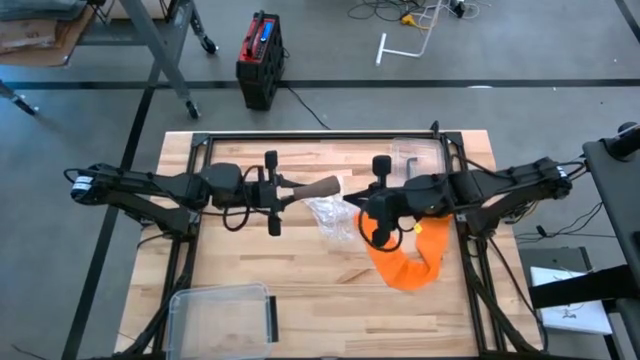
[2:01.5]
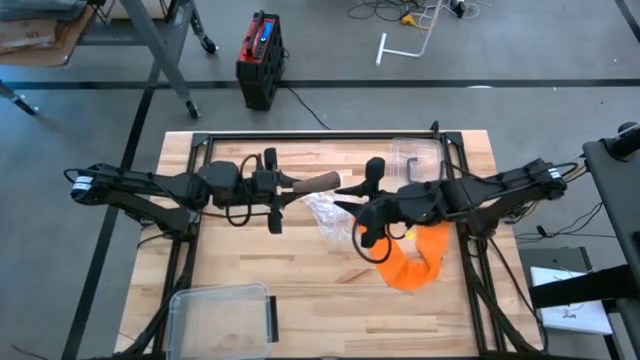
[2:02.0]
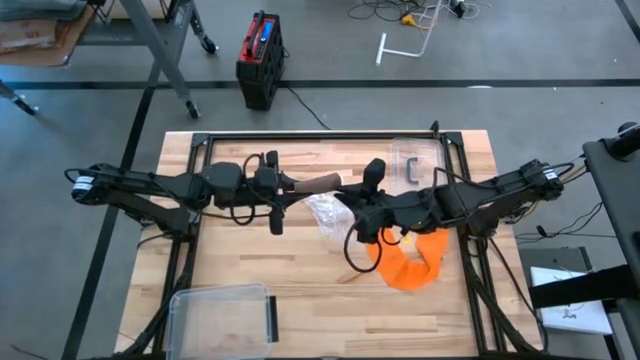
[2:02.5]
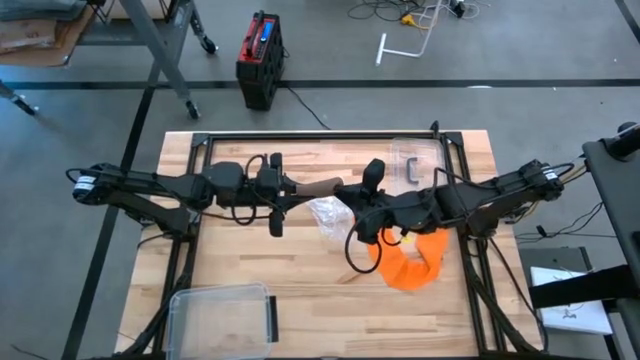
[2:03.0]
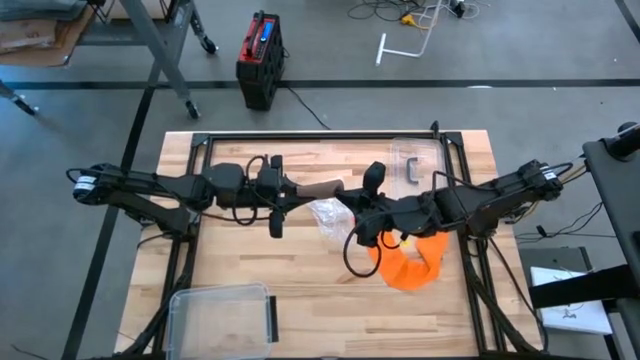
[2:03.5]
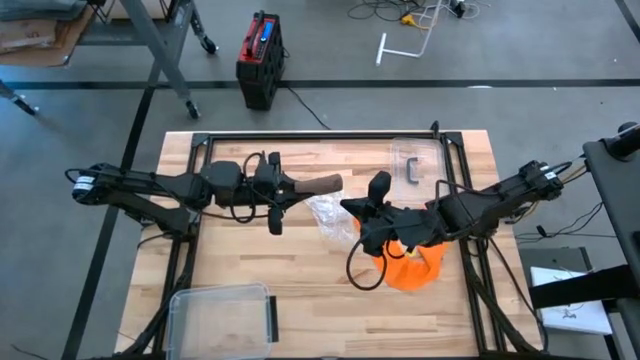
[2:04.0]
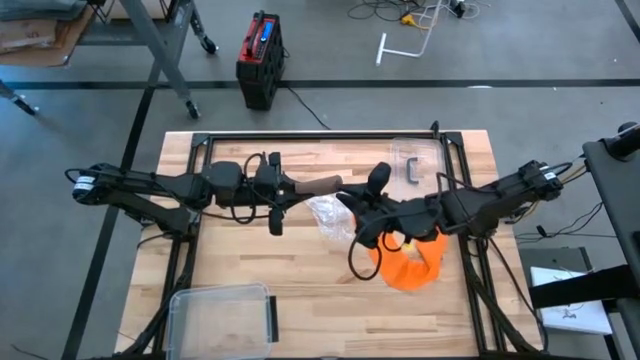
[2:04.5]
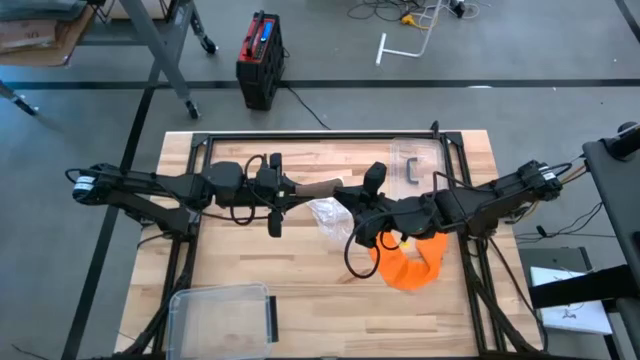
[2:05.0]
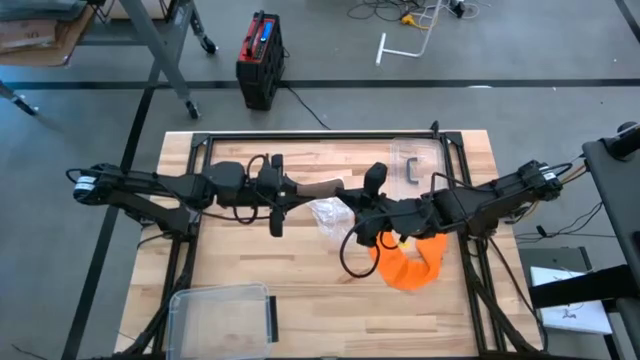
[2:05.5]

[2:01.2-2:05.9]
Task: Roll bandage
Roll the brown bandage

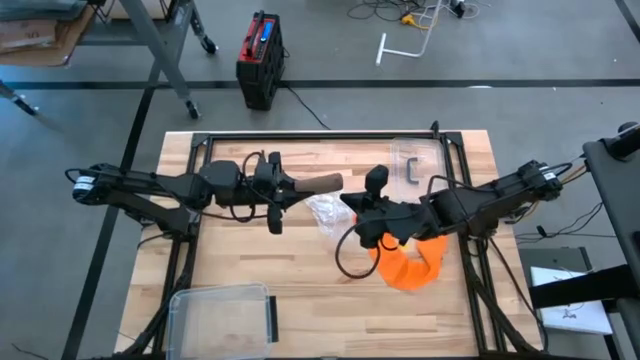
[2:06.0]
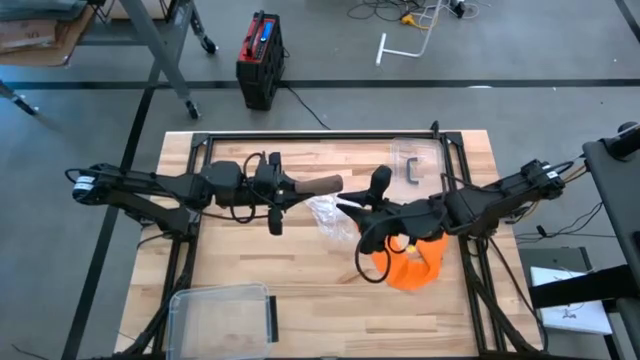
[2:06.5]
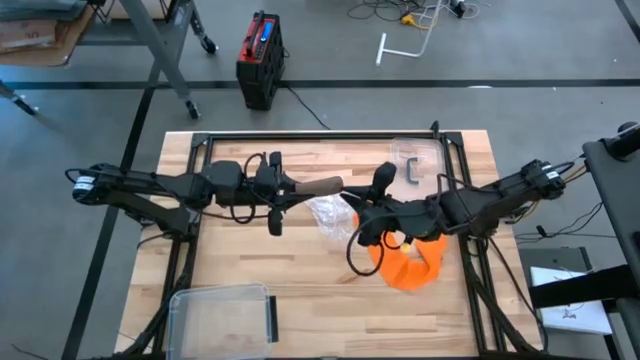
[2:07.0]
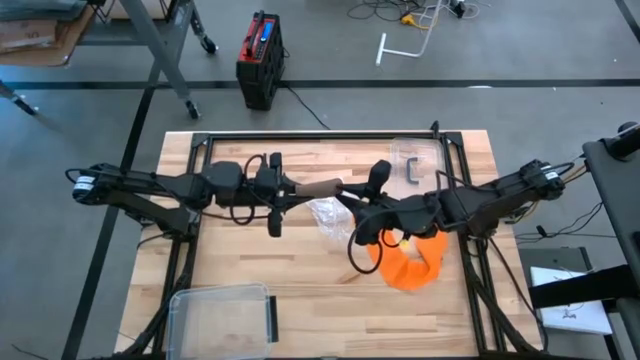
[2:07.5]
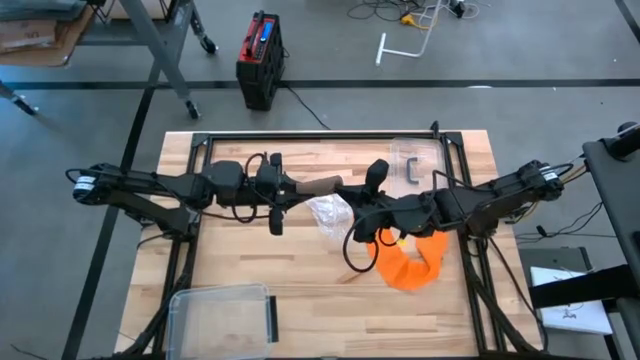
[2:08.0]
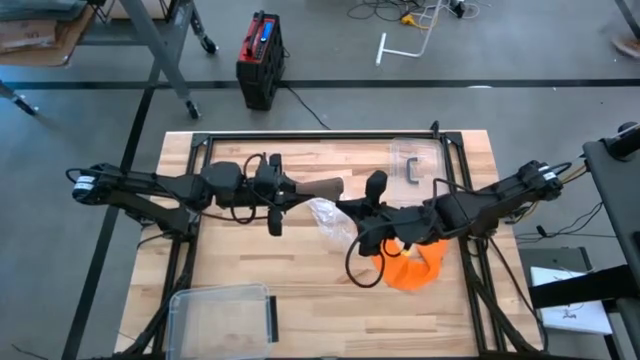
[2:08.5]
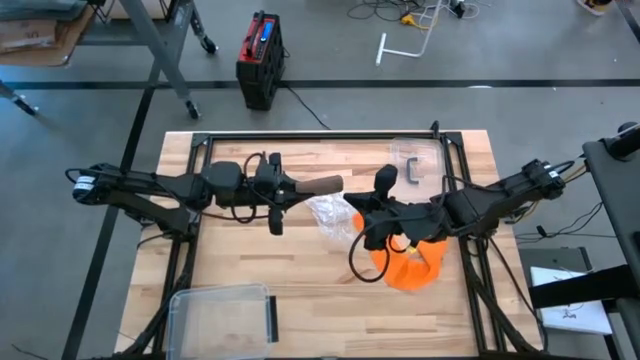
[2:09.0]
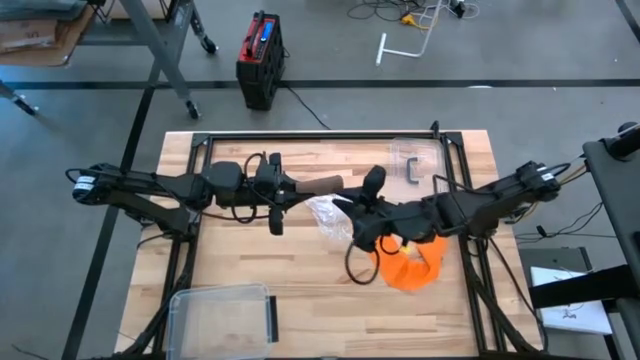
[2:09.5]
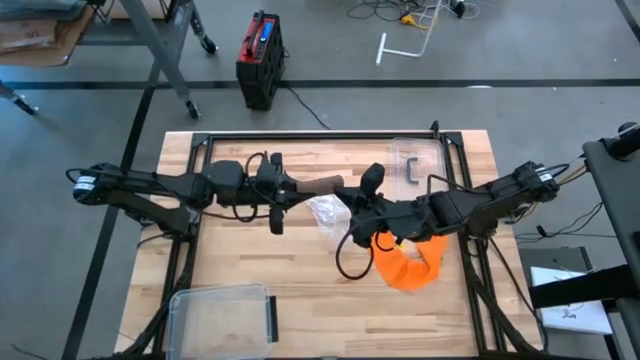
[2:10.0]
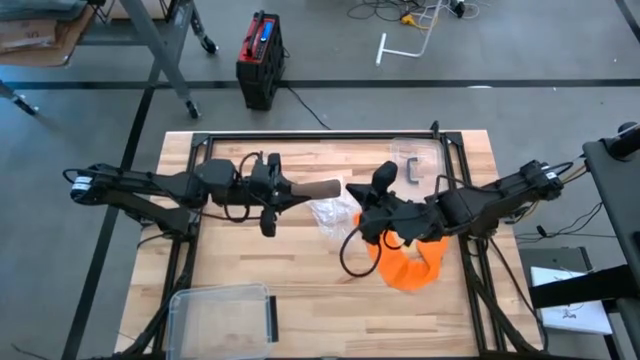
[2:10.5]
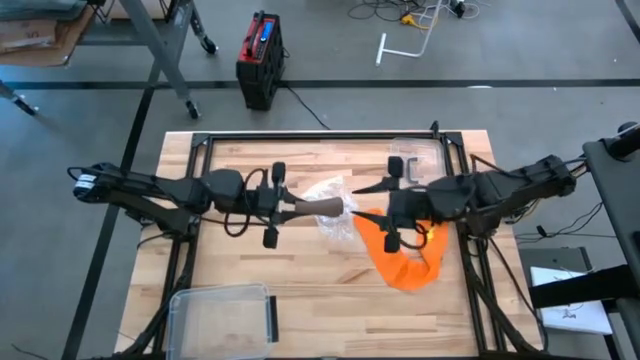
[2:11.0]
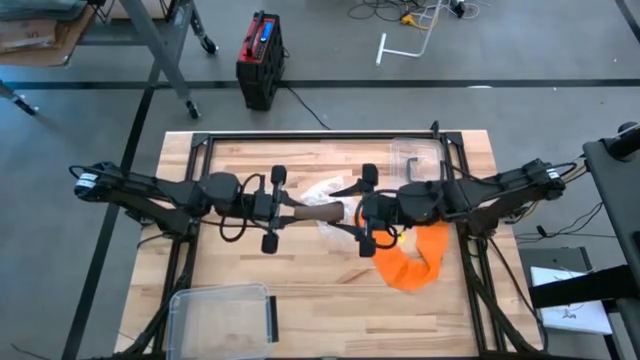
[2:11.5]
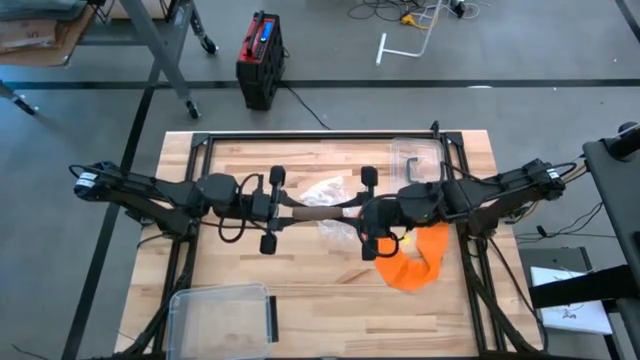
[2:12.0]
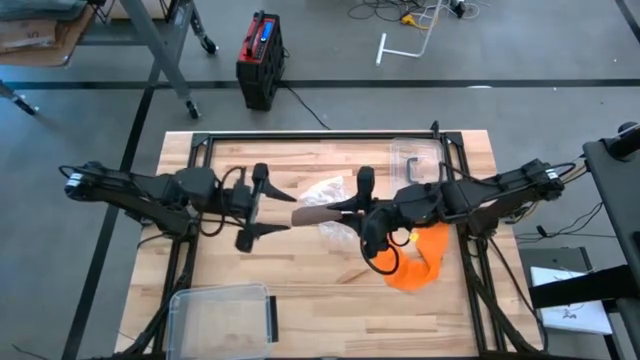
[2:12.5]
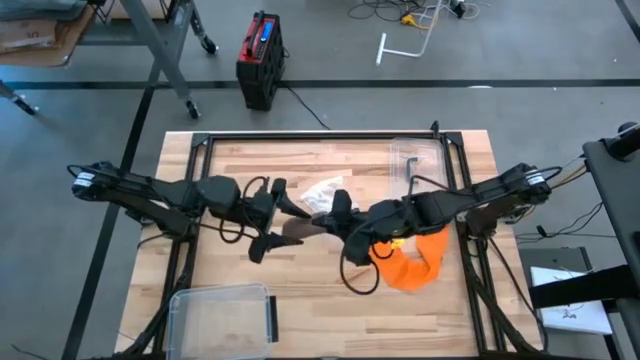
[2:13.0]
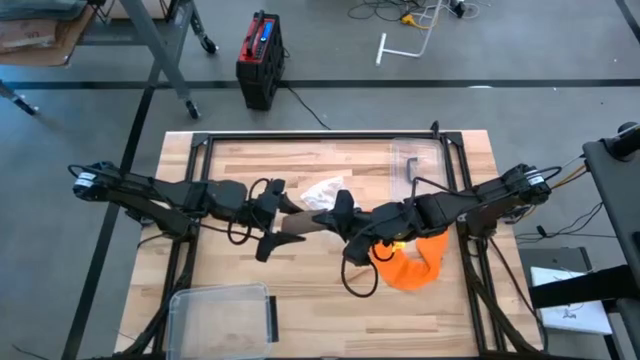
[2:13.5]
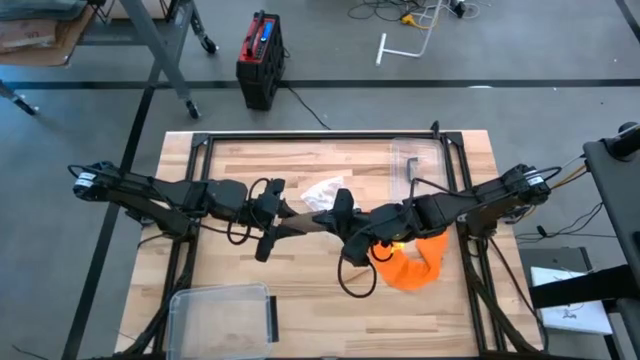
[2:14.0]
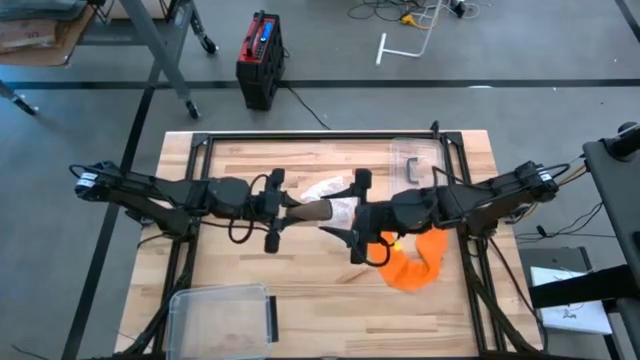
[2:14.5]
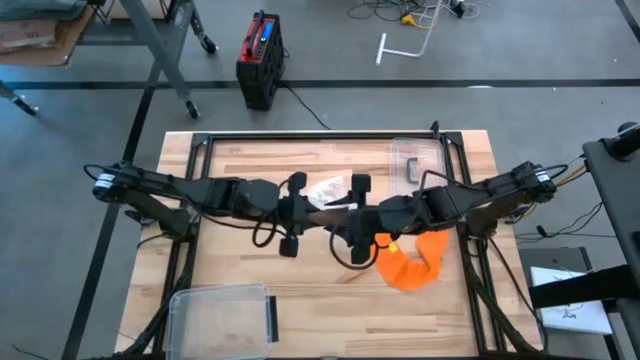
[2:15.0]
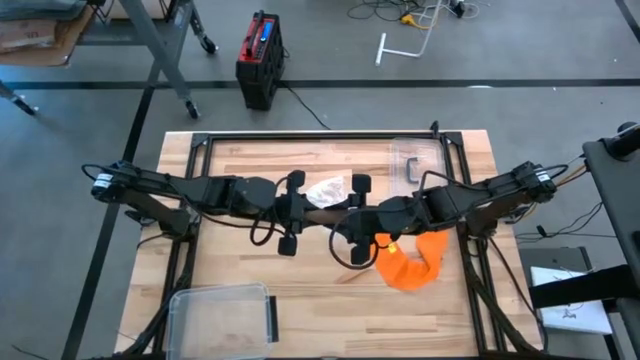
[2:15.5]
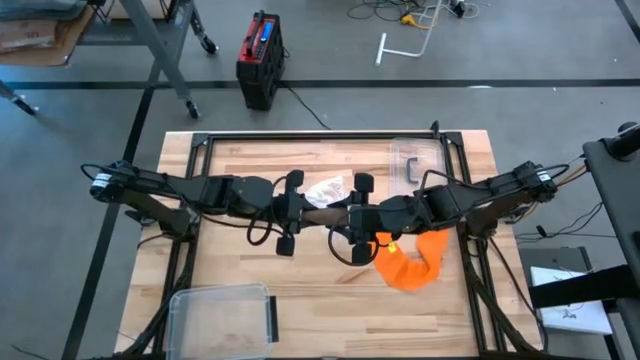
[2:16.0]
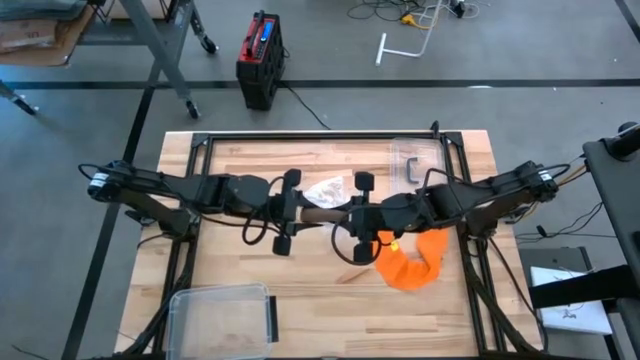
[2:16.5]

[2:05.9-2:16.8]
Roll the brown bandage

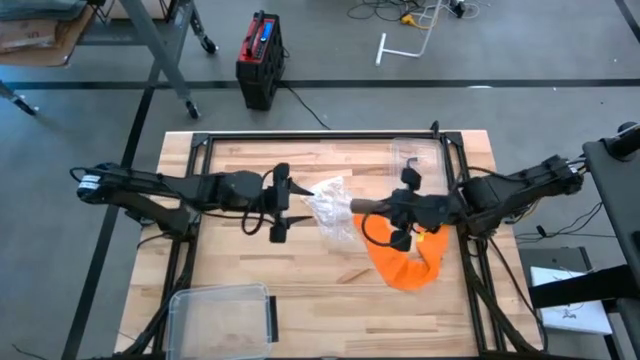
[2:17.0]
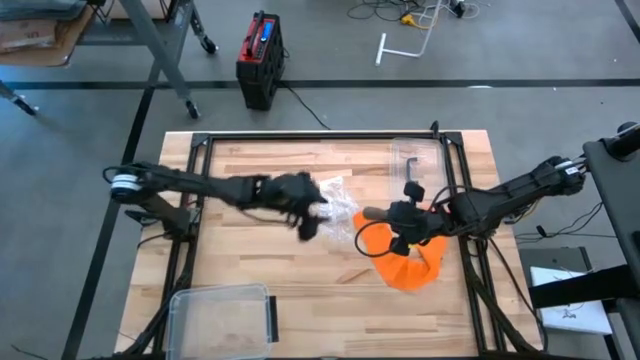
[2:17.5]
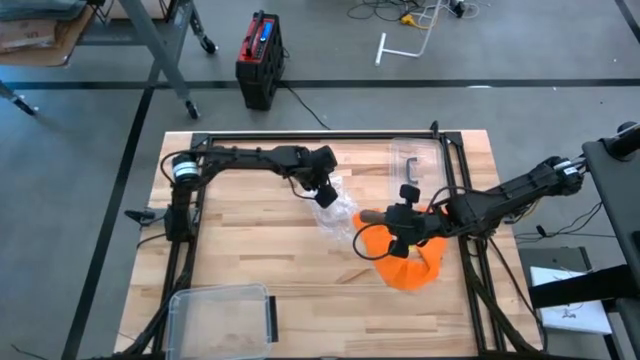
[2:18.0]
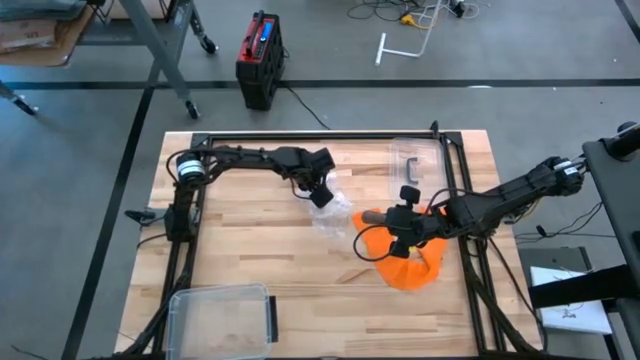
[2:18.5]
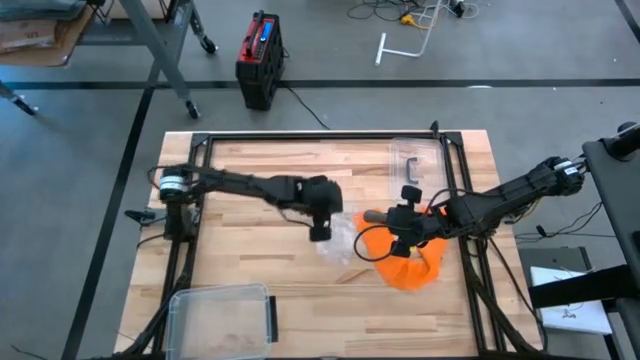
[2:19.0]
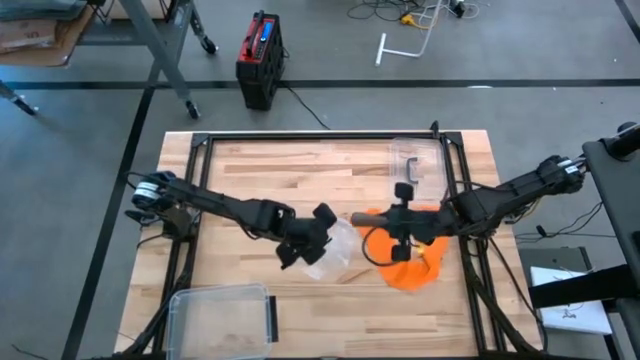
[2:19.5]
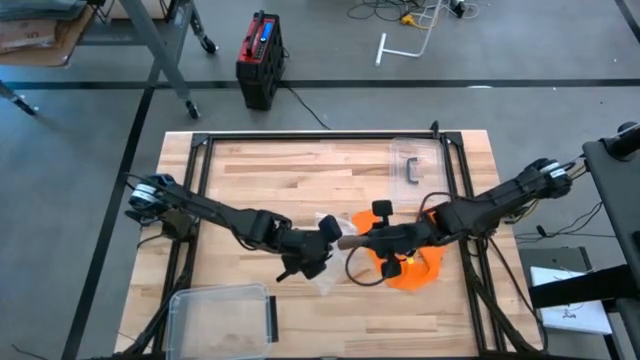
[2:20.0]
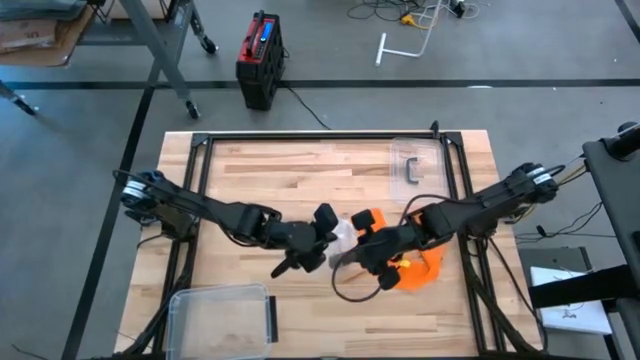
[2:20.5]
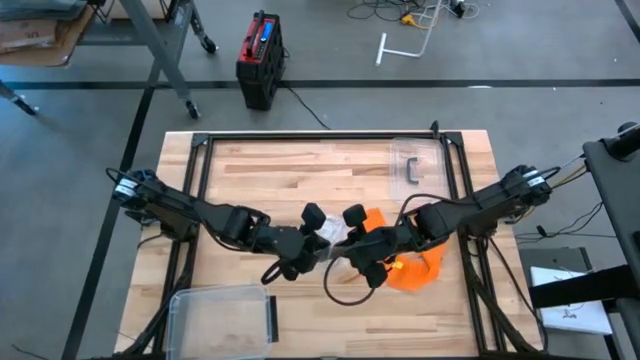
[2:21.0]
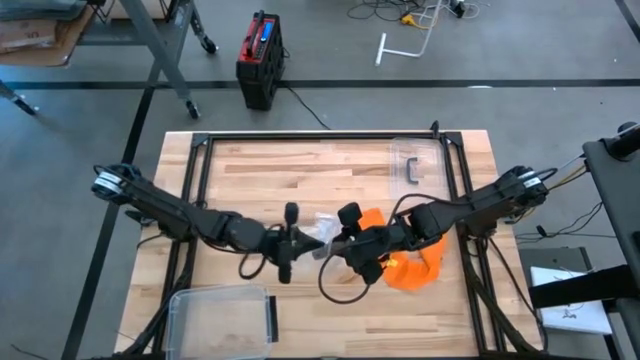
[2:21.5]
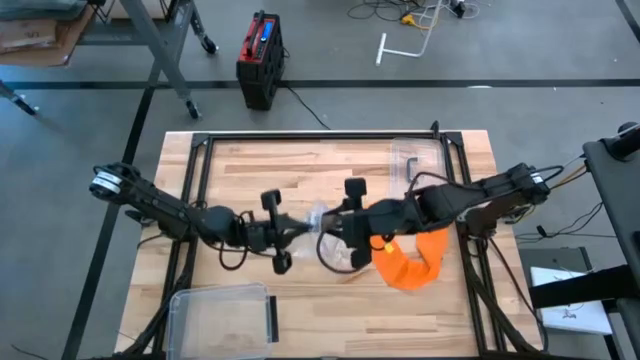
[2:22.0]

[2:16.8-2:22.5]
Put the brown bandage into the top transparent zip bag
